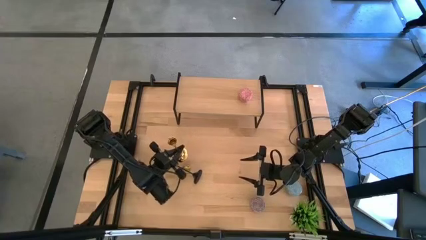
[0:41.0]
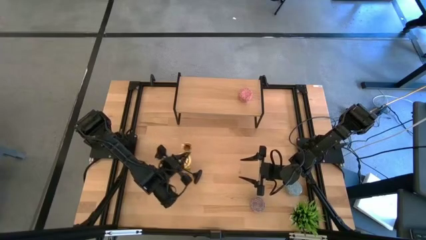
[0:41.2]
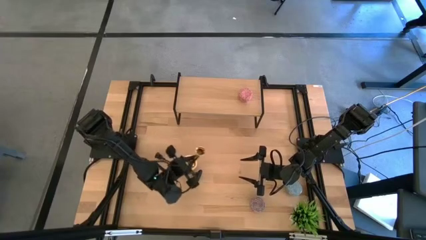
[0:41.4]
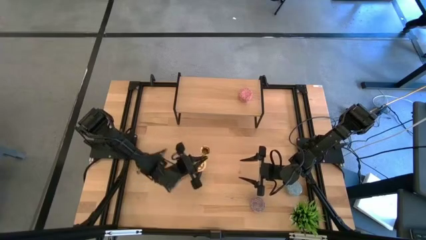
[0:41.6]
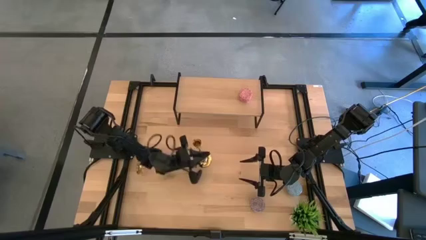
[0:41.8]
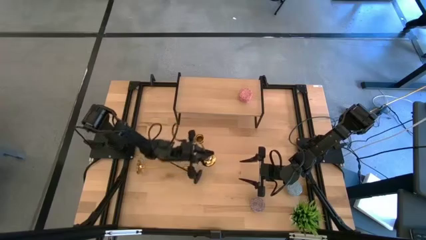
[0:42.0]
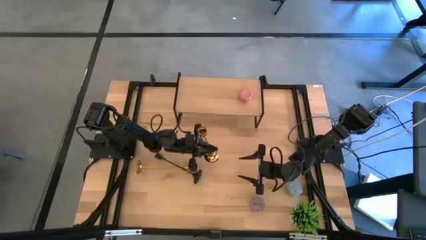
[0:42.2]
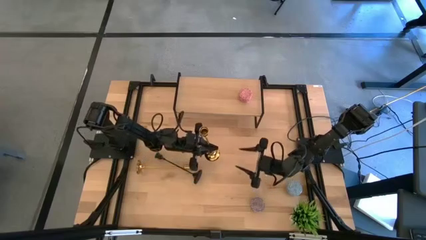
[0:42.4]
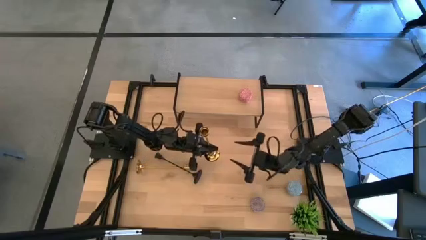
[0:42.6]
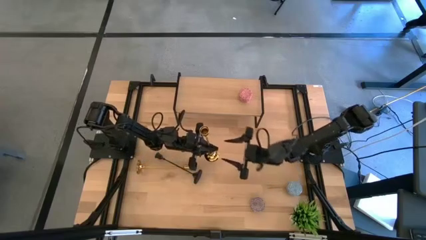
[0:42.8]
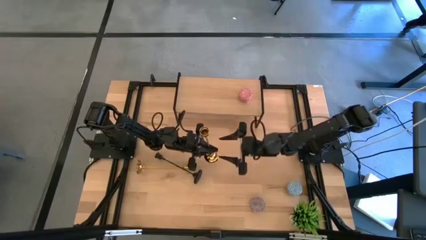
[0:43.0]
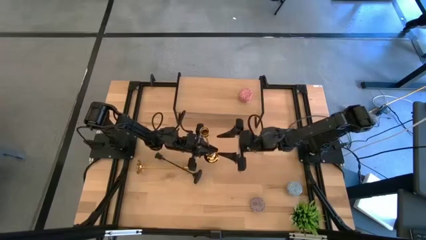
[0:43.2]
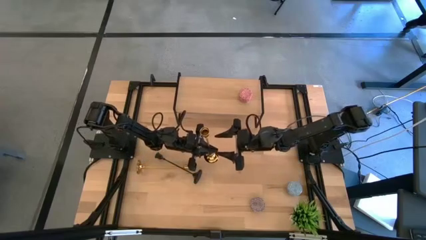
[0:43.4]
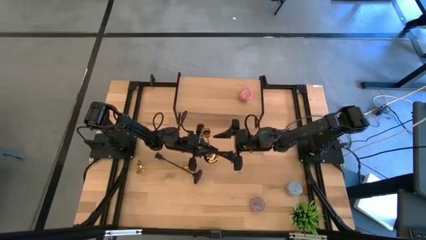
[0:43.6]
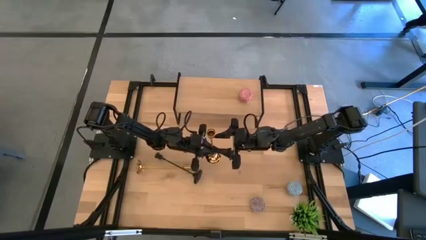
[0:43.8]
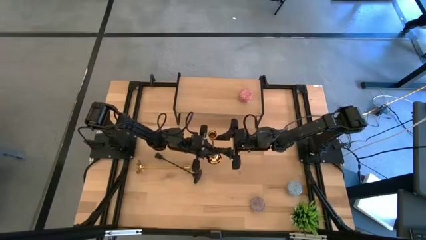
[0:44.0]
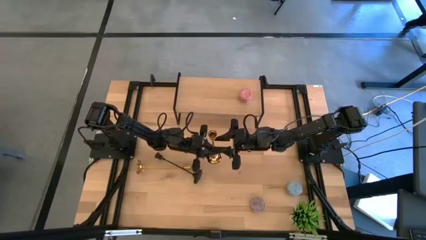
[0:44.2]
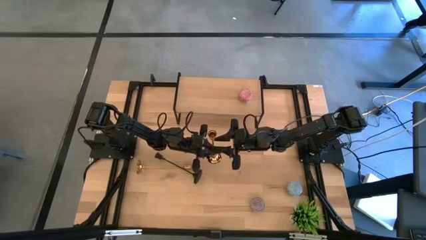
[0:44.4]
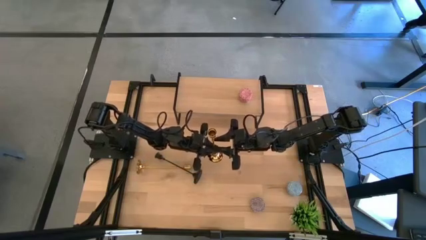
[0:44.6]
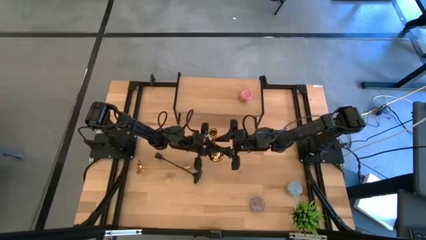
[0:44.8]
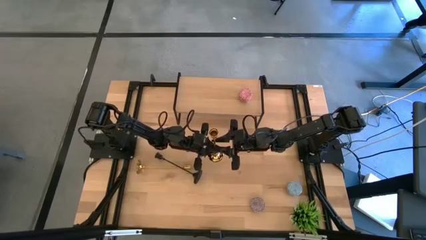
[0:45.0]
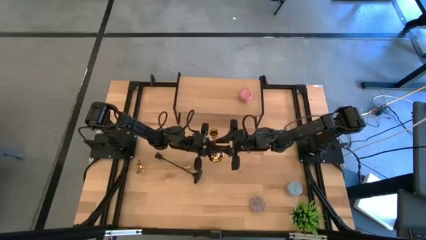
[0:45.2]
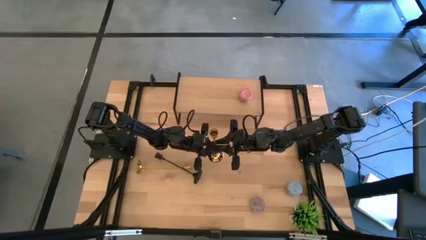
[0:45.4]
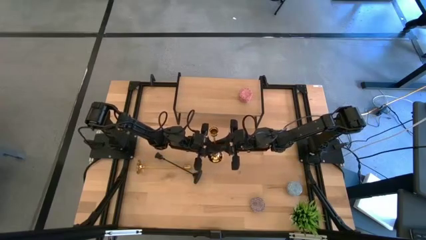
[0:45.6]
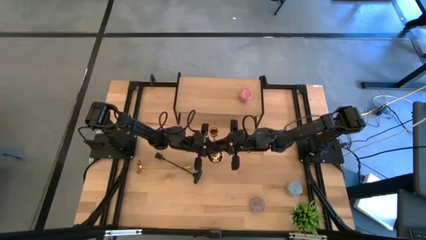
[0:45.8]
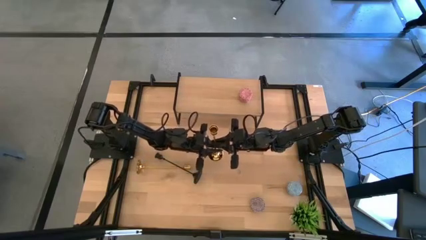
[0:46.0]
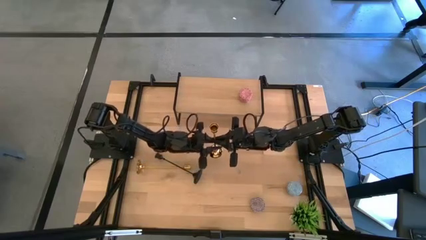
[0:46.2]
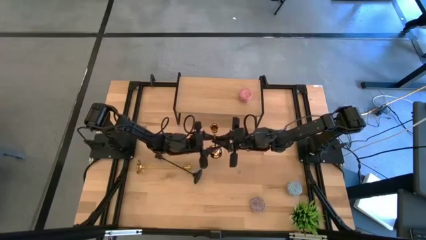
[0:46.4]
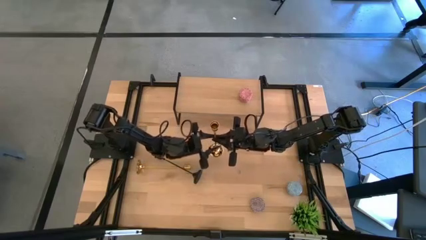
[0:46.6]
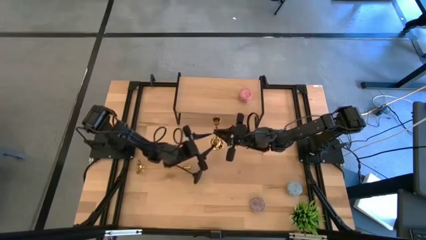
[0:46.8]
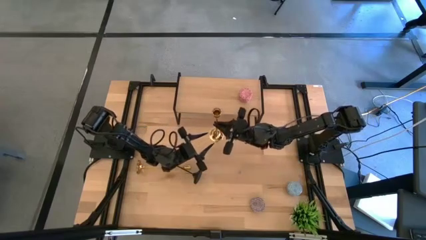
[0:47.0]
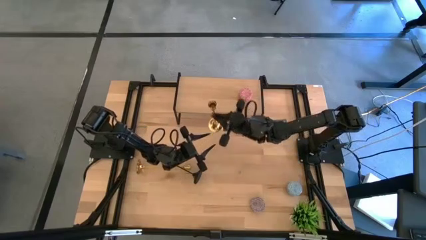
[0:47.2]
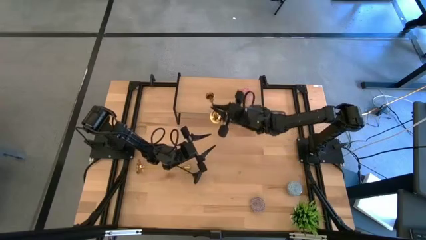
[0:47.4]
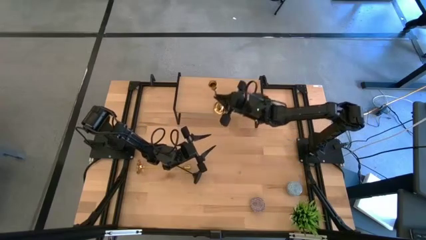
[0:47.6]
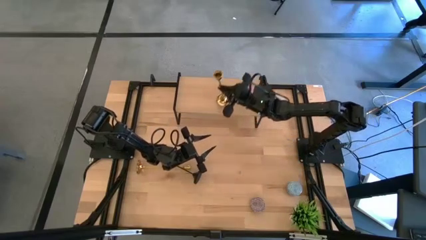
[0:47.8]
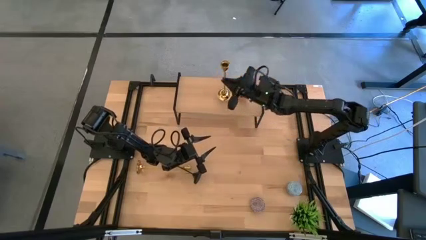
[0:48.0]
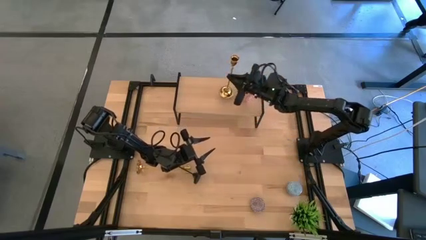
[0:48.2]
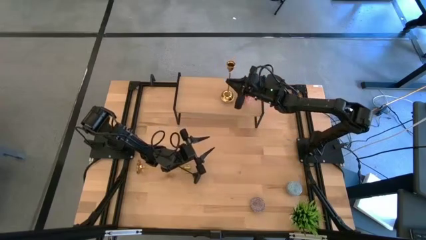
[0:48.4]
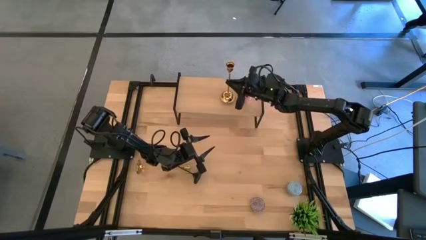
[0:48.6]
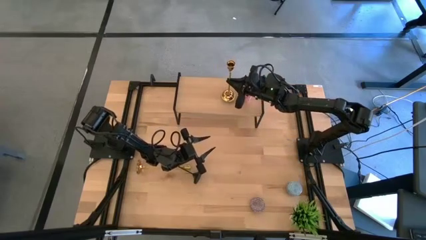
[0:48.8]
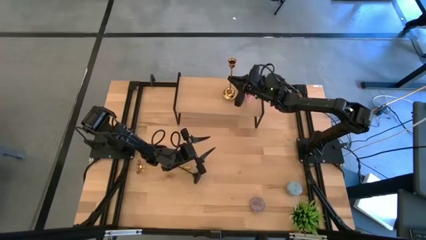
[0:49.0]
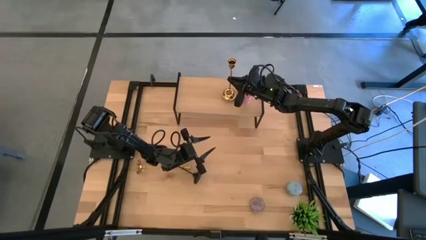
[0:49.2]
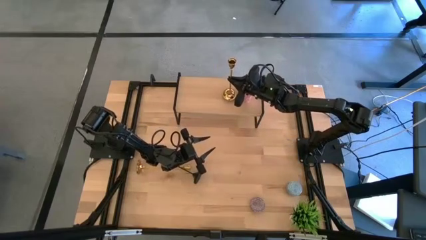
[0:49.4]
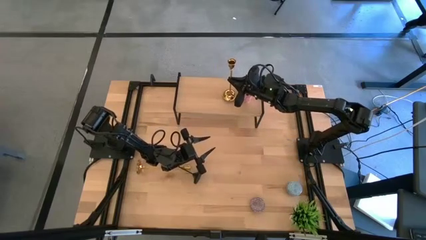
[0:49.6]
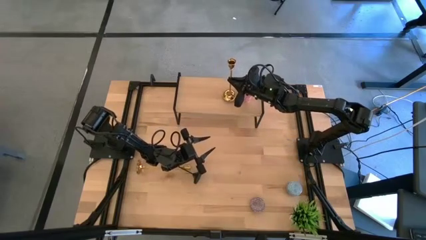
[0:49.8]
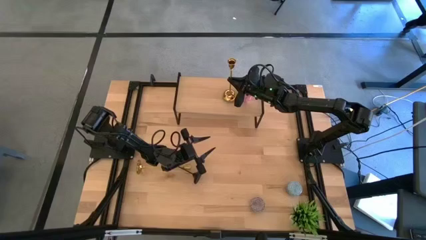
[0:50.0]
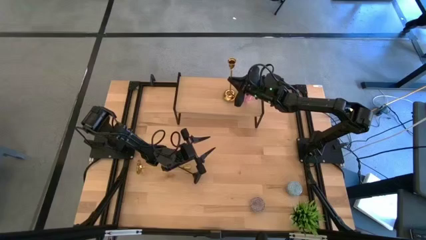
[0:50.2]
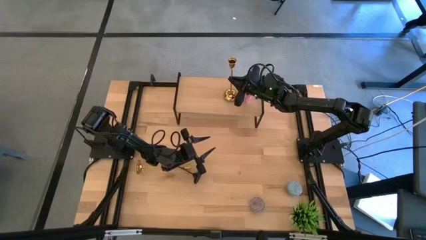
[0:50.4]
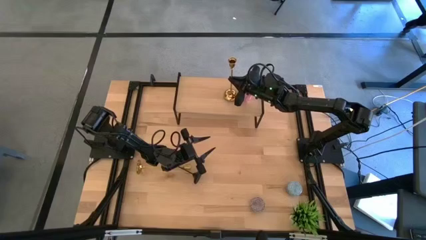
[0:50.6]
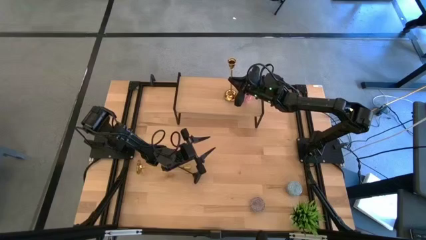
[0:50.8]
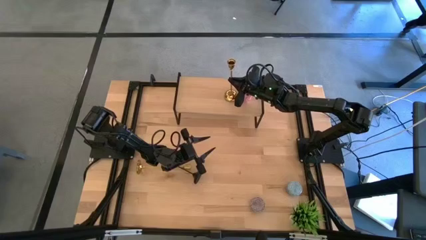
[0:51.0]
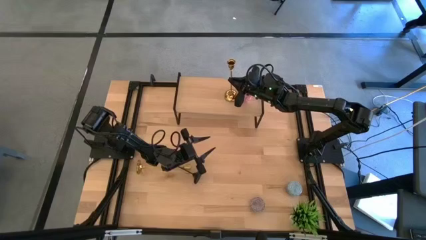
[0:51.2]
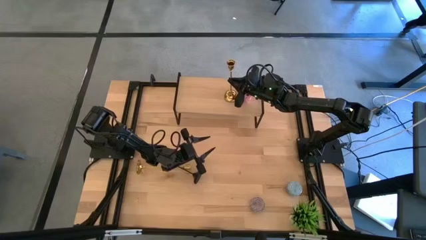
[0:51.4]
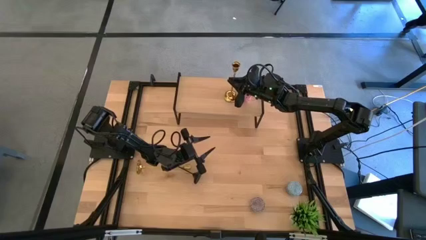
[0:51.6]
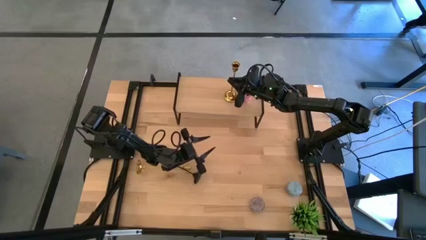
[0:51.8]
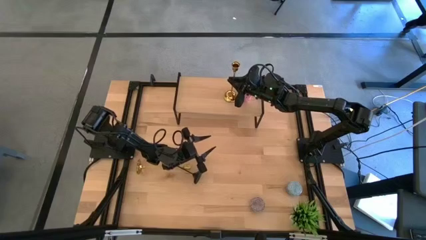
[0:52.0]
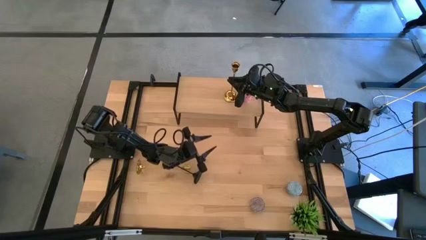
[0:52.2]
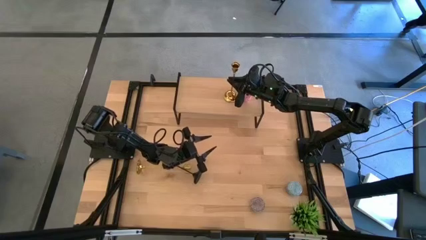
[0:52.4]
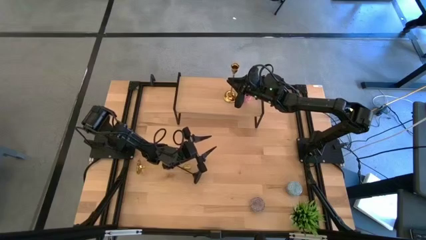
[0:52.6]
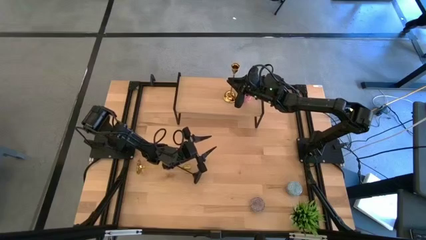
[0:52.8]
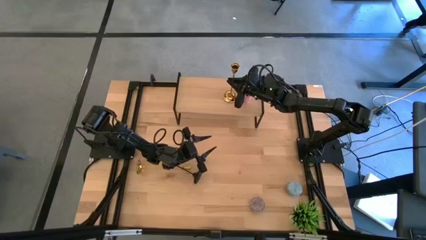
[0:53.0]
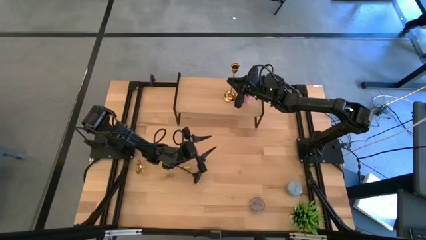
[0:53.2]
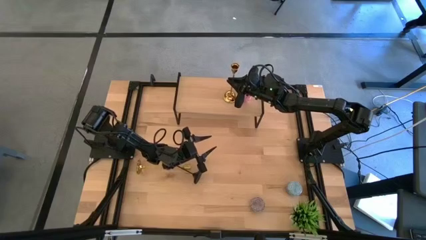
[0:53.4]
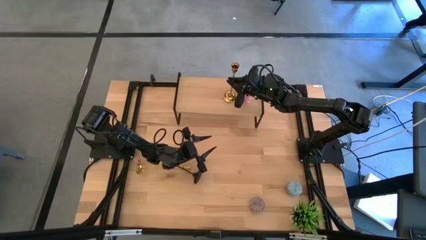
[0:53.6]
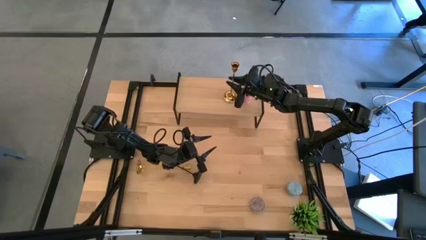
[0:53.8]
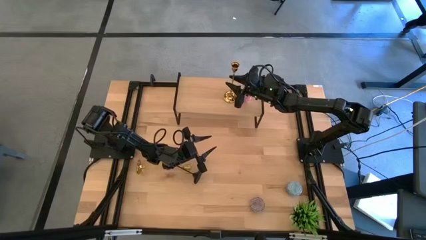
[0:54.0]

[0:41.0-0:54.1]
Task: Pick & Place candle stick holders
Put the gold candle holder on the shelf
